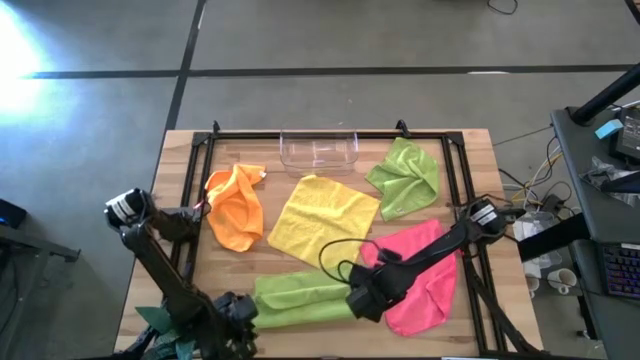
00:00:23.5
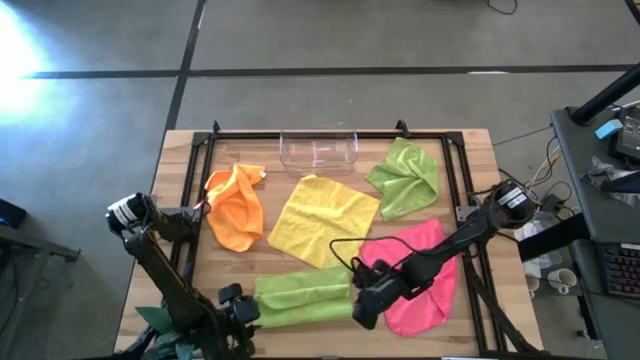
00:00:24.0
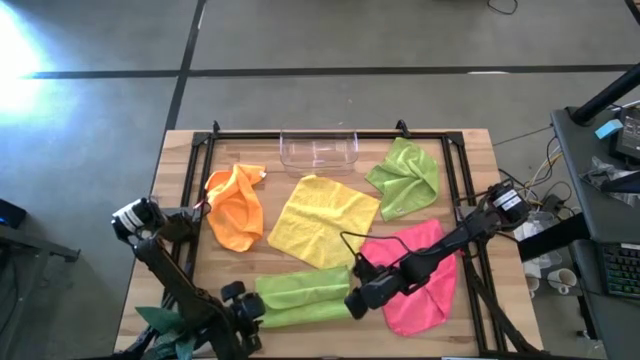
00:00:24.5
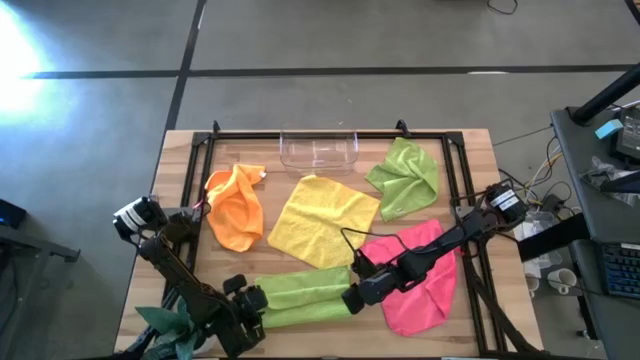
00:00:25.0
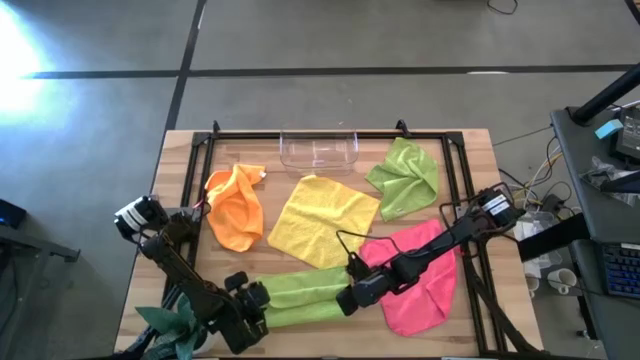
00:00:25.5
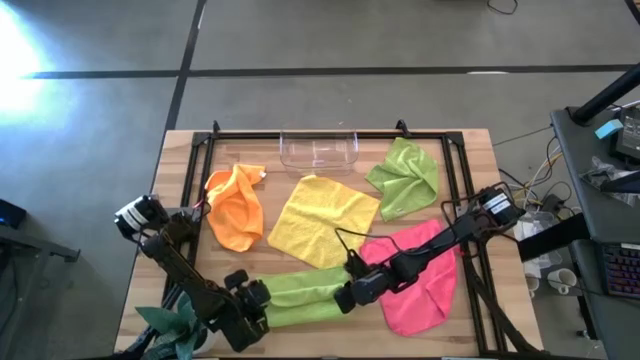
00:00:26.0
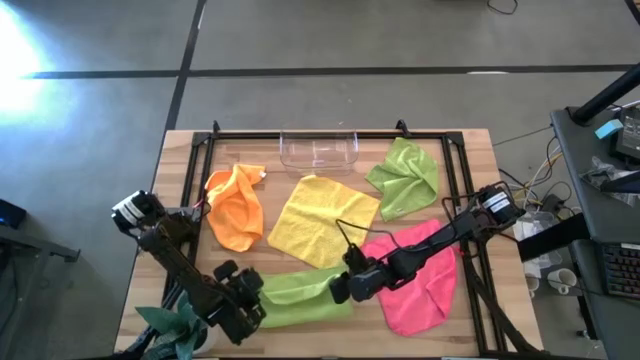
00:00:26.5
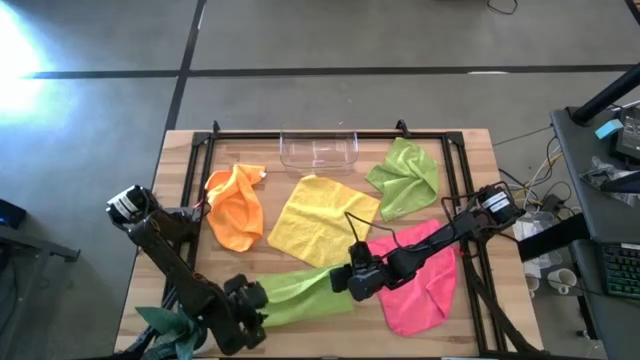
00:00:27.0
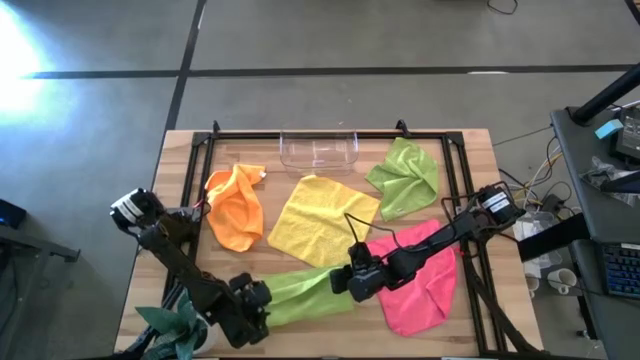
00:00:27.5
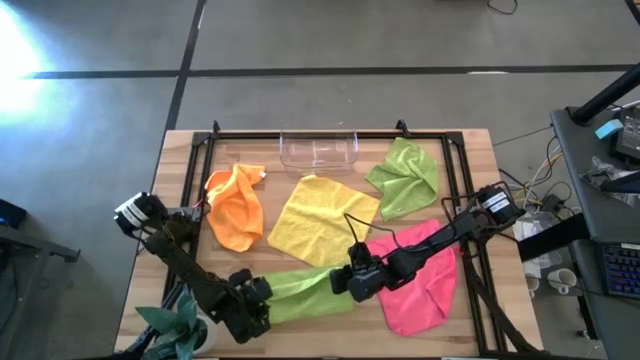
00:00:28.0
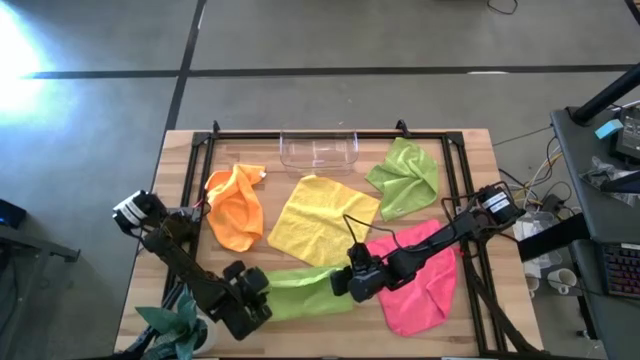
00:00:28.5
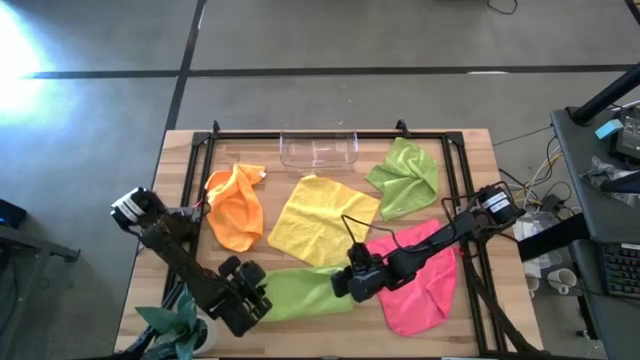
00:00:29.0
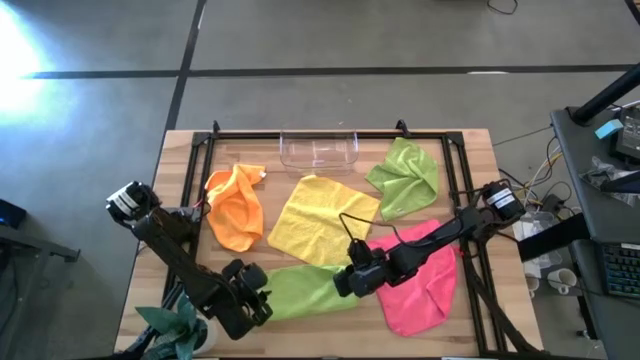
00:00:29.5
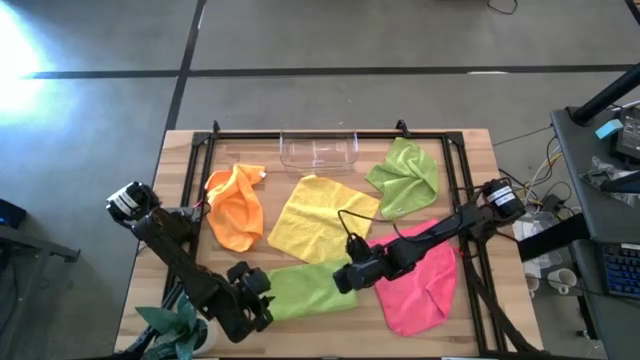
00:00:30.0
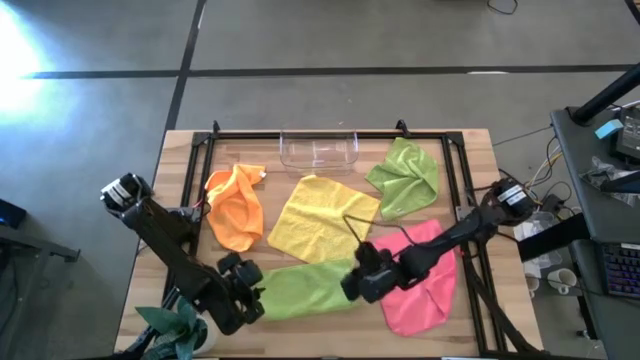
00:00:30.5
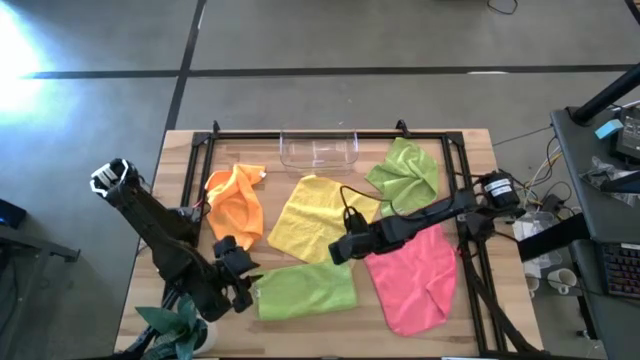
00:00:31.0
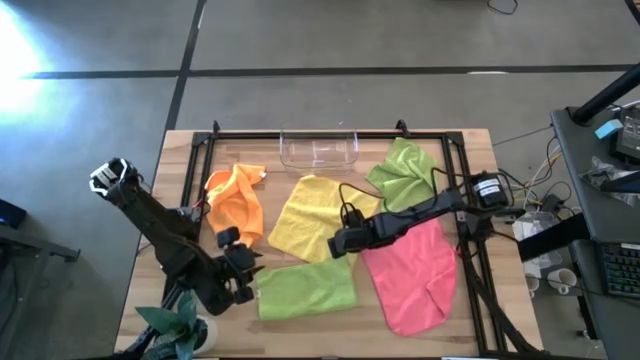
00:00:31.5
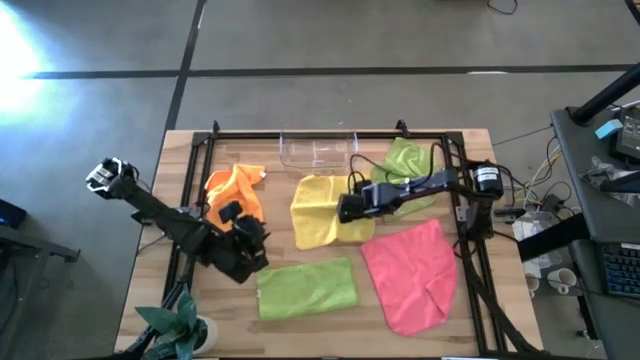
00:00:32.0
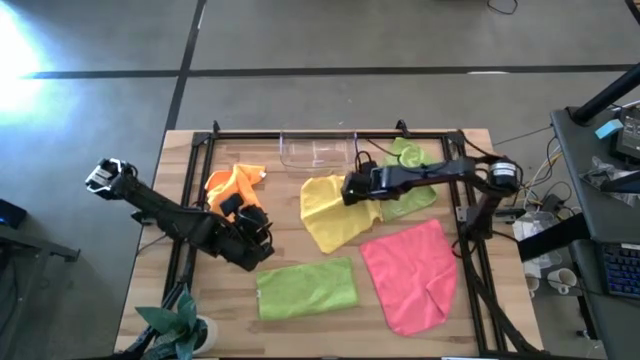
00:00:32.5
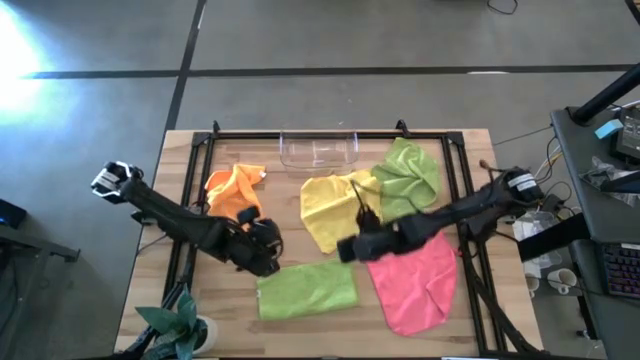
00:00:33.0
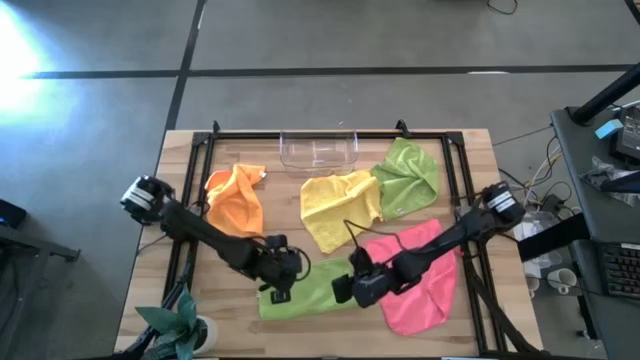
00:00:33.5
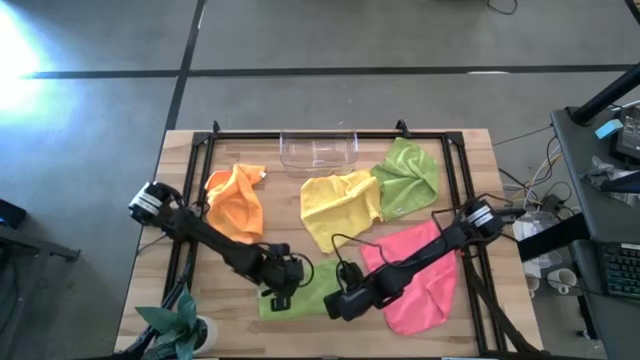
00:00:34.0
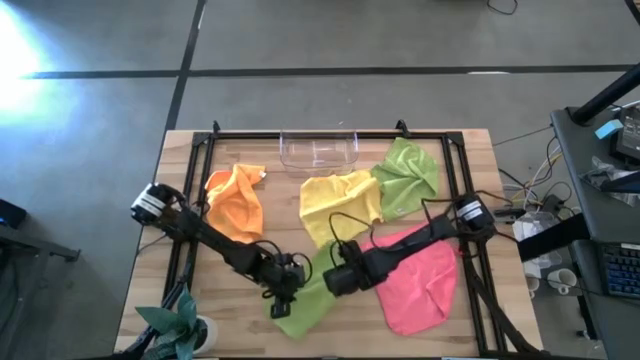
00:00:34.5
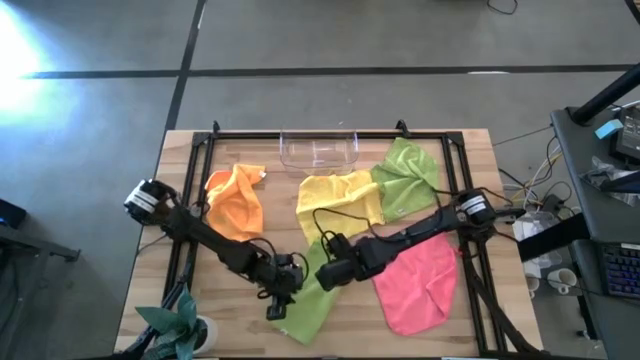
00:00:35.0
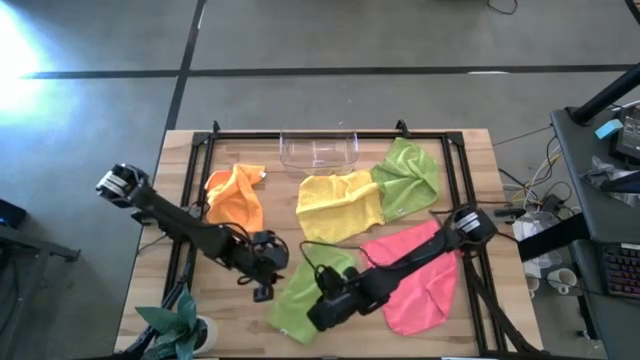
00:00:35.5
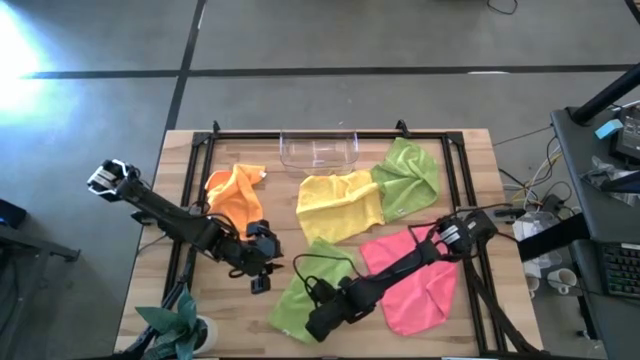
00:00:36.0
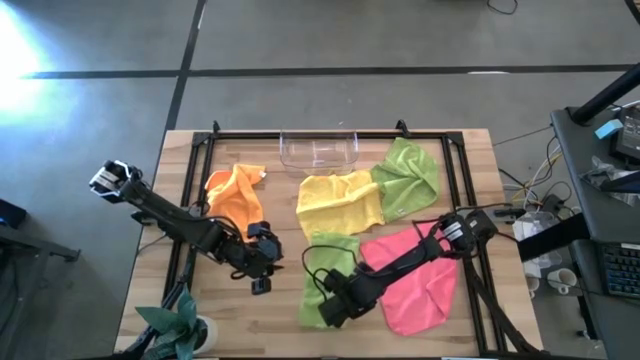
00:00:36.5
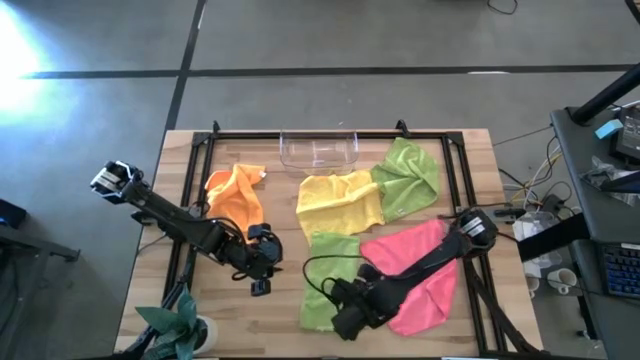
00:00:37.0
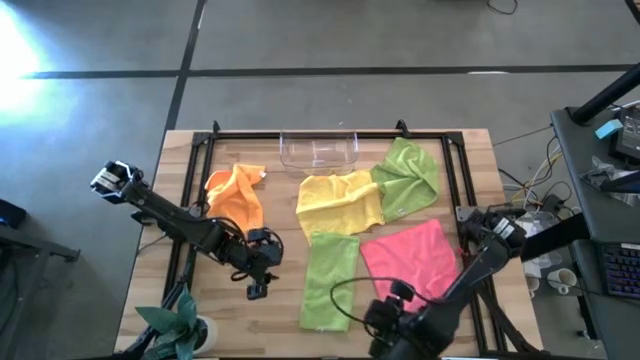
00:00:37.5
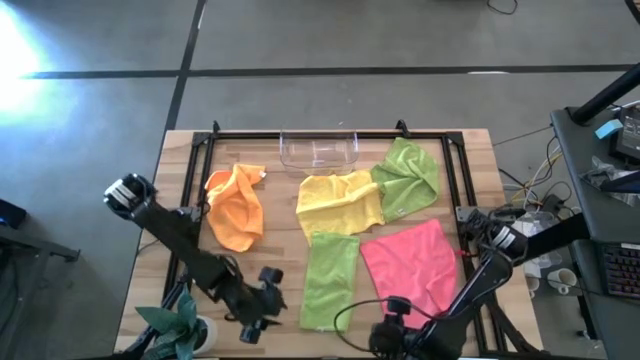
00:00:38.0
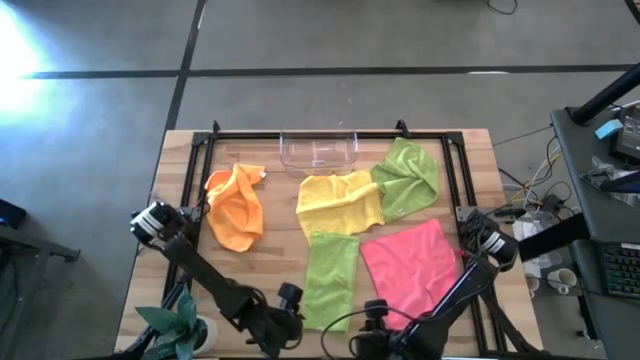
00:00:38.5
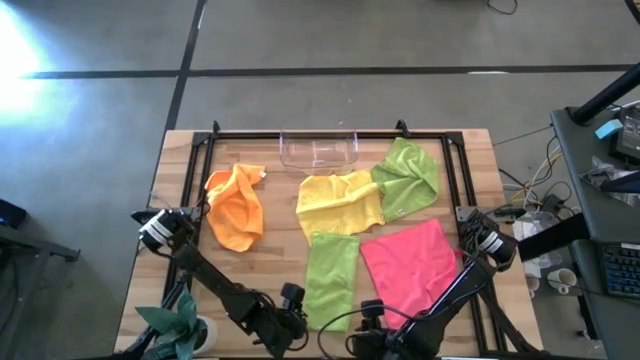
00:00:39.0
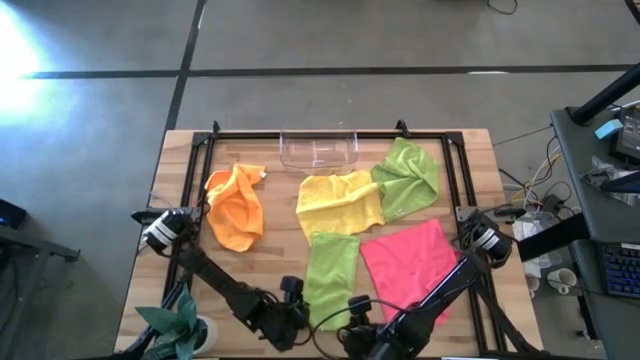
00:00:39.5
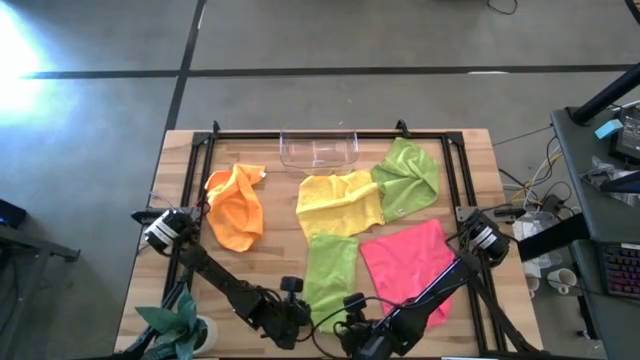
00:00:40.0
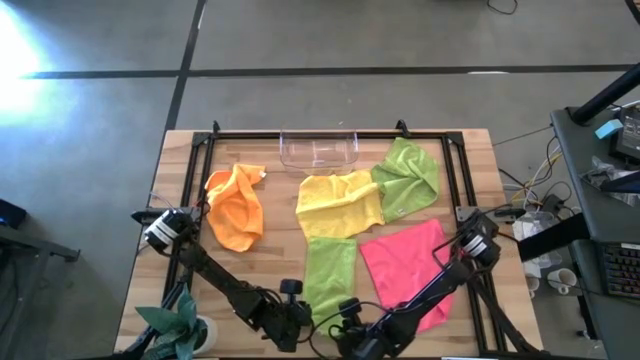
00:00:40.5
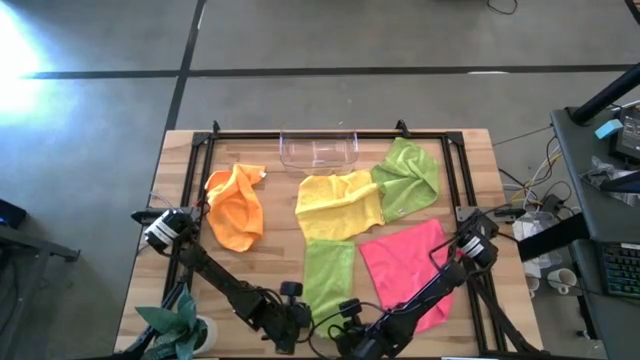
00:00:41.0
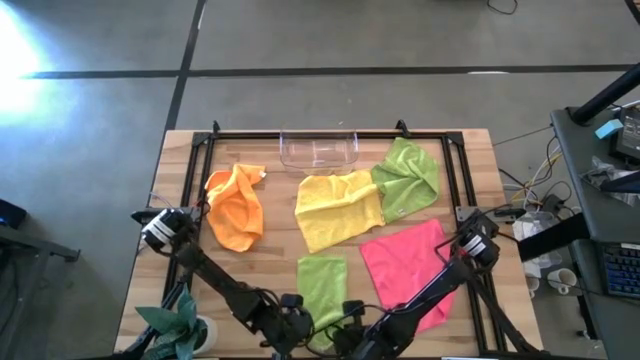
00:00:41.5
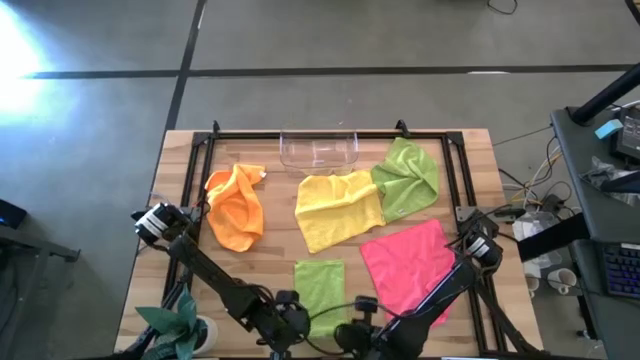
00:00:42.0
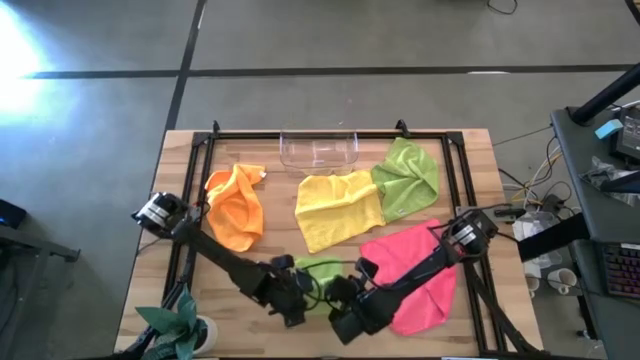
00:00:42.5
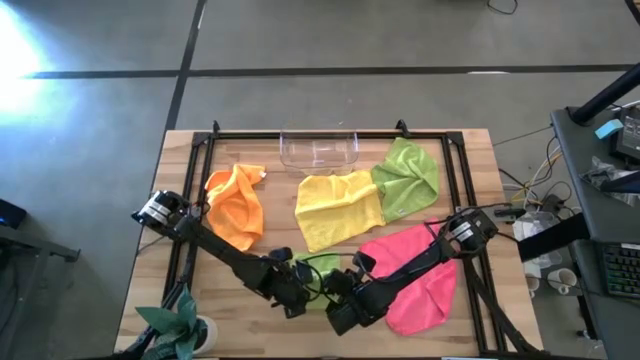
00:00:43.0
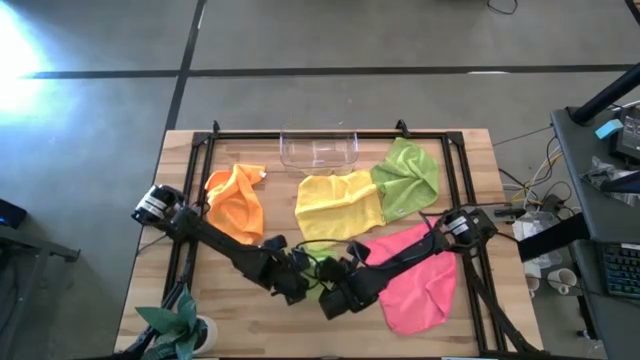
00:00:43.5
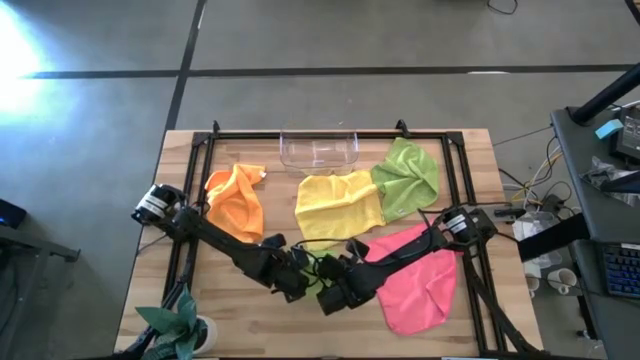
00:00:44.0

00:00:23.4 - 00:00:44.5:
Task: Fold microfiber towels
Fold the bottom green microfiber cloth
